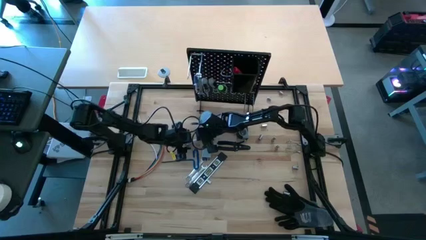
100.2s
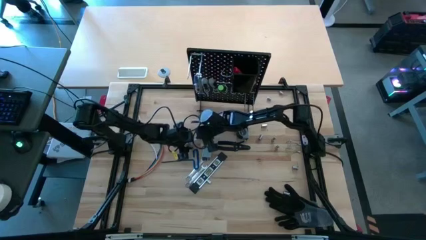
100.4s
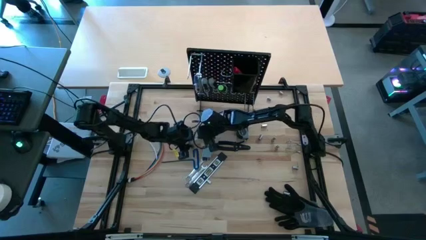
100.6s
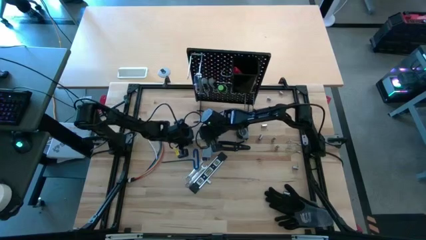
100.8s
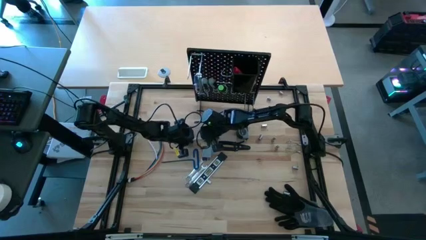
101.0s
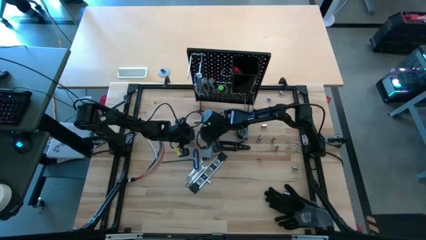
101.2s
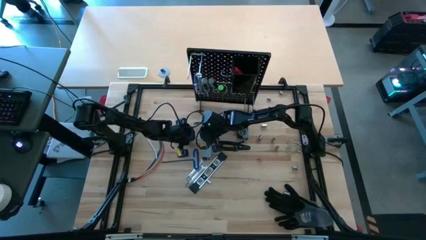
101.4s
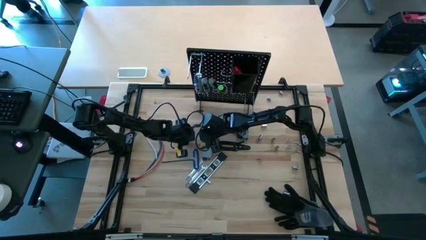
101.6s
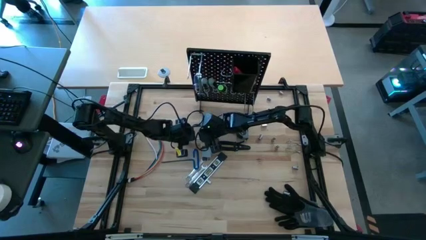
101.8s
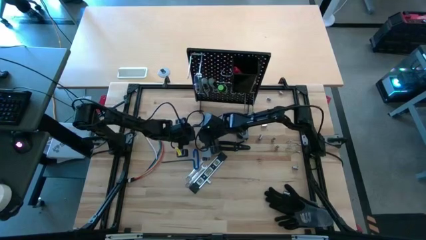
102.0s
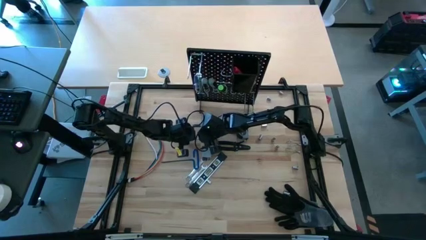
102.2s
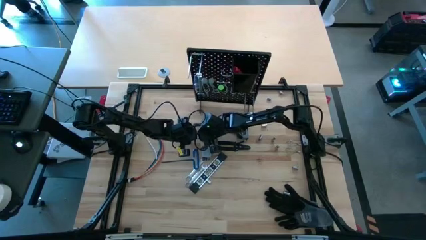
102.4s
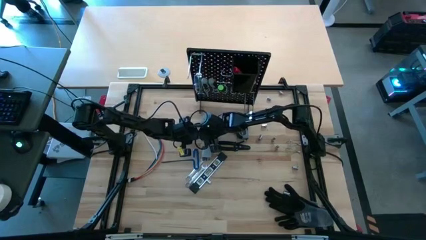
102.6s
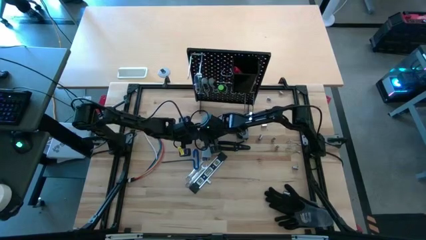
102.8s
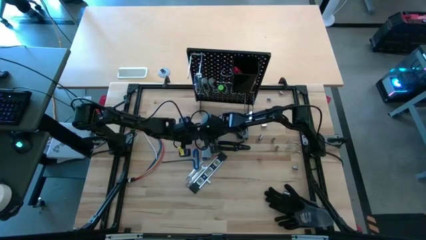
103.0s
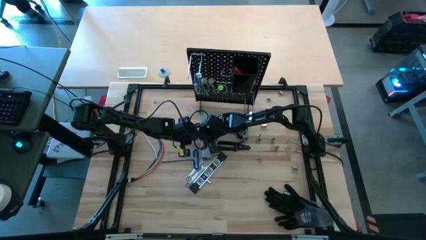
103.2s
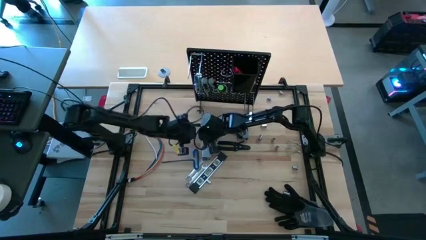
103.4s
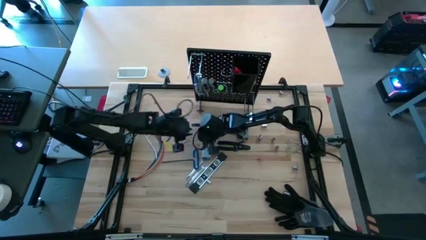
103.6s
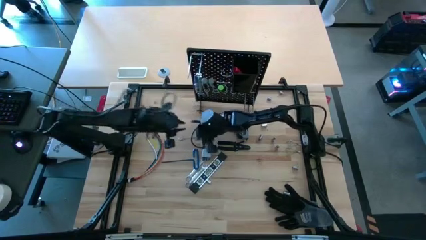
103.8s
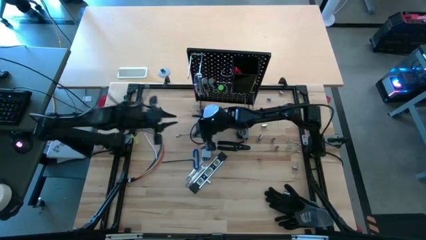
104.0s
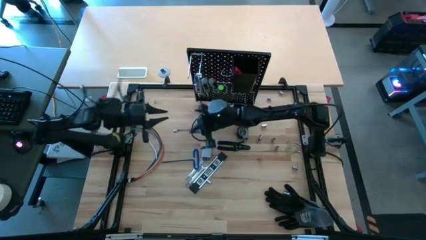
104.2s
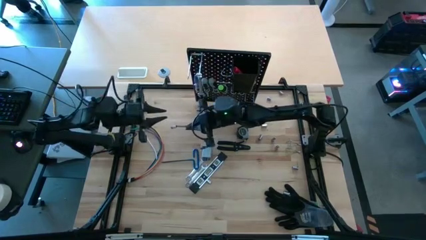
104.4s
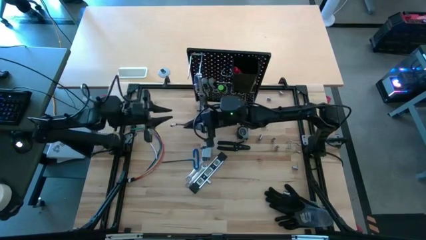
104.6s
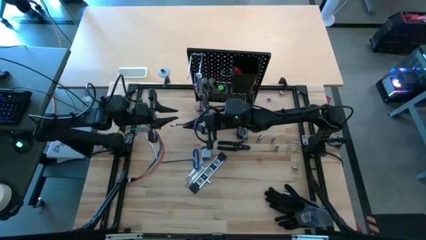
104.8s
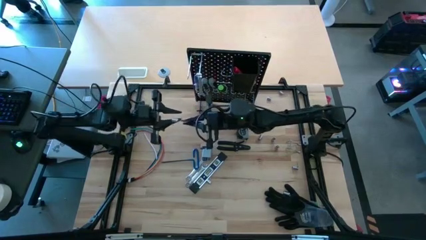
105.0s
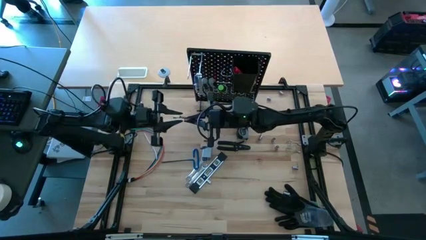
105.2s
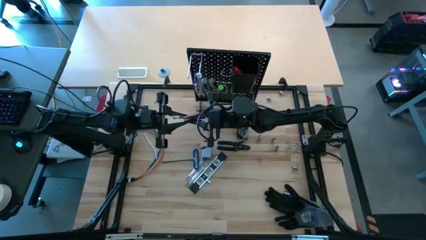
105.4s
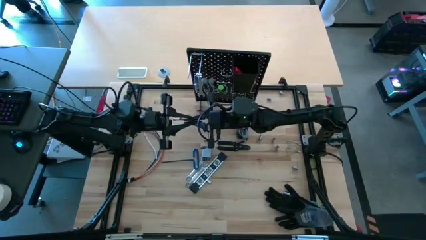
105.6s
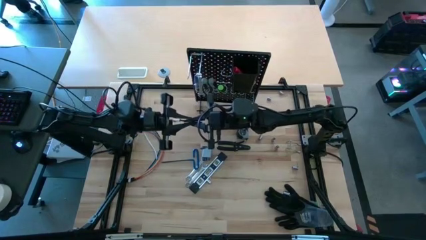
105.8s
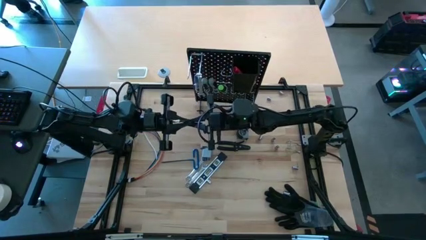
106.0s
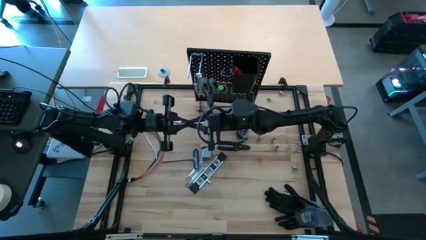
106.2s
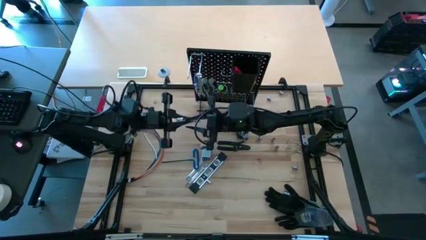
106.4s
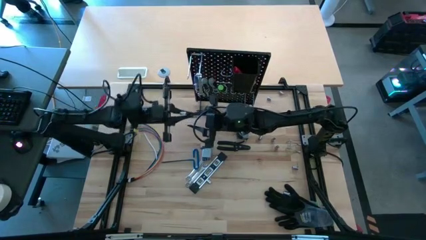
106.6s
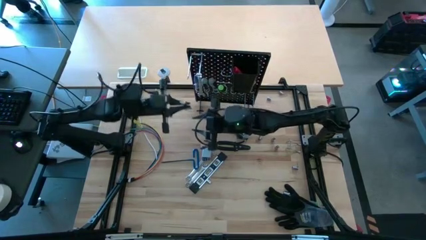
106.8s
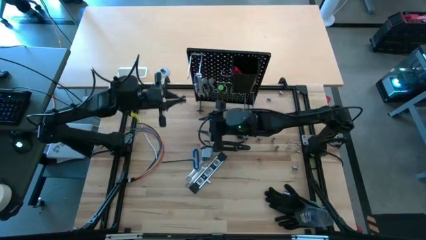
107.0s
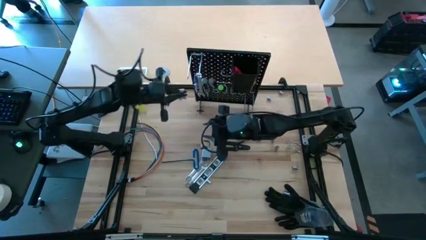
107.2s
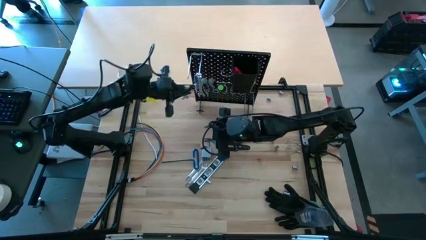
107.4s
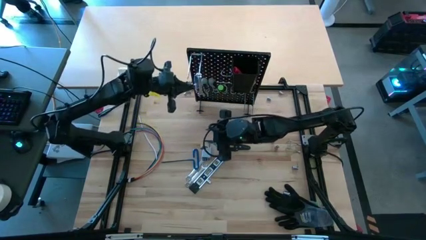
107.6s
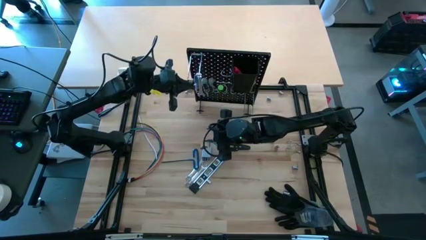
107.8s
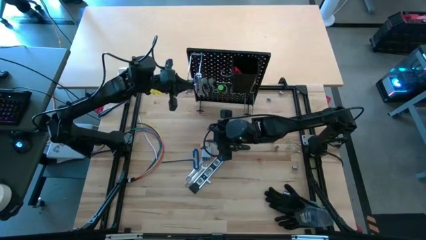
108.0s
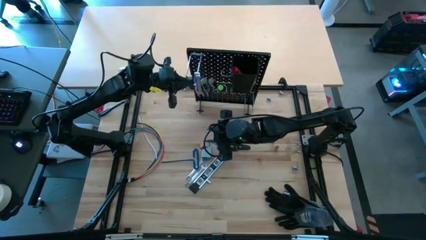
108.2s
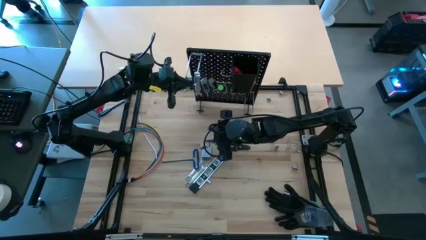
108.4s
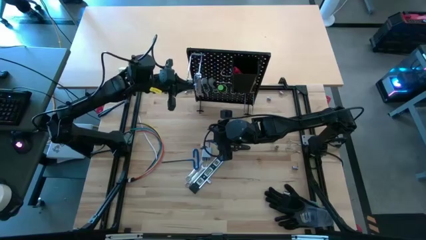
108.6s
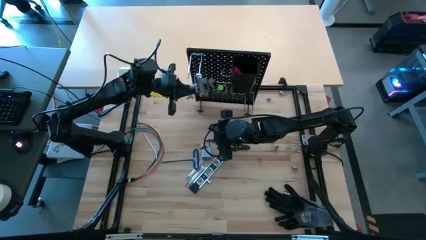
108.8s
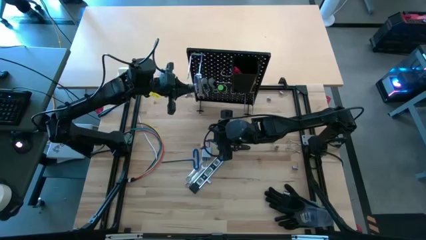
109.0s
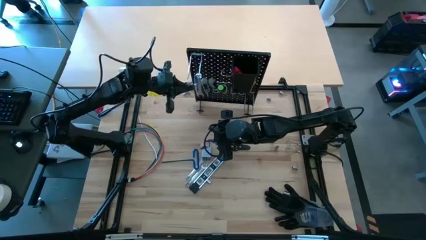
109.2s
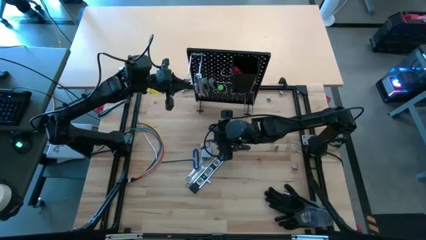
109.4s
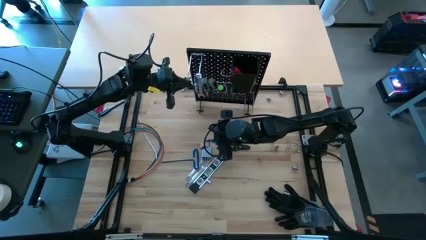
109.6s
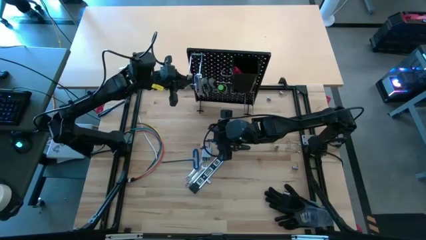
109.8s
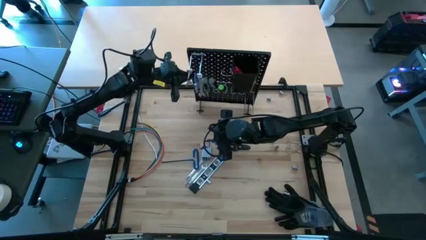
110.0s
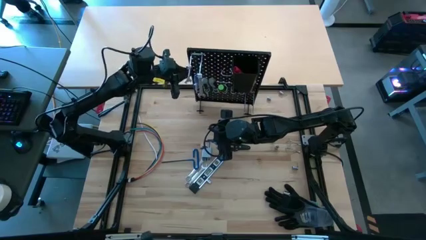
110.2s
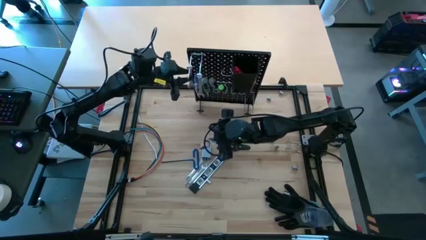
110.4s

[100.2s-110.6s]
Task: Hang tools onto peg board
Hang the wrench on the peg board

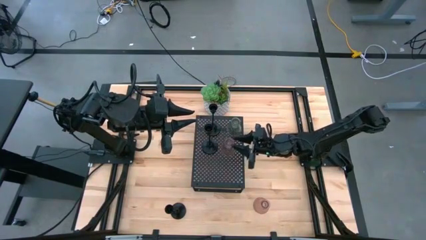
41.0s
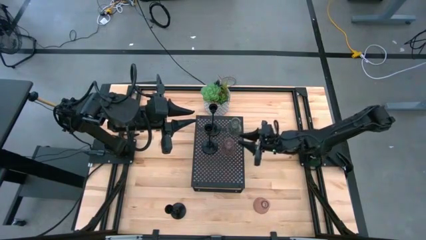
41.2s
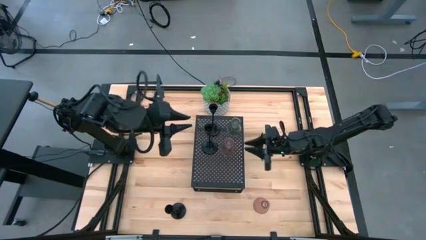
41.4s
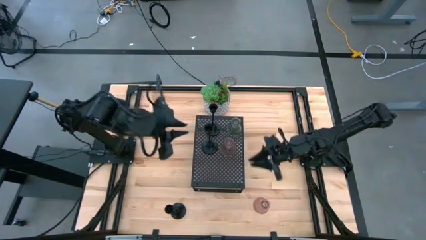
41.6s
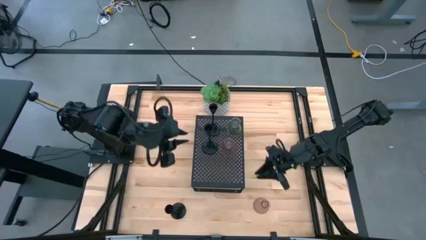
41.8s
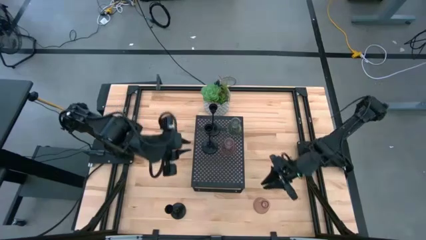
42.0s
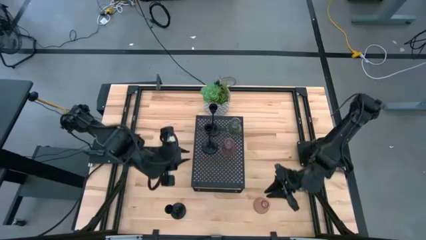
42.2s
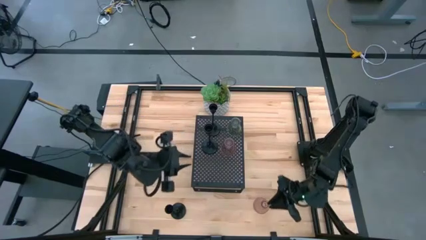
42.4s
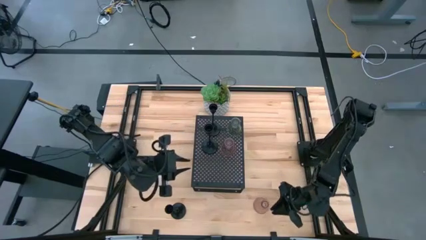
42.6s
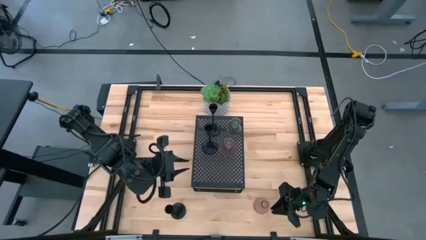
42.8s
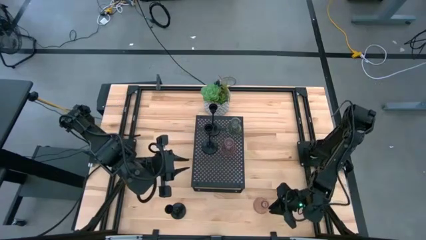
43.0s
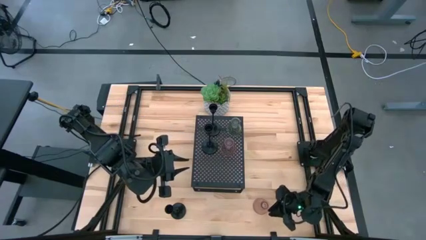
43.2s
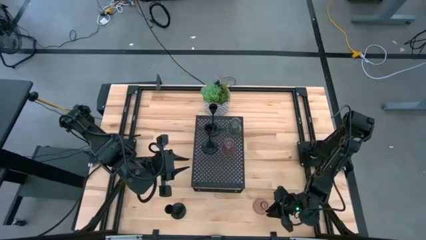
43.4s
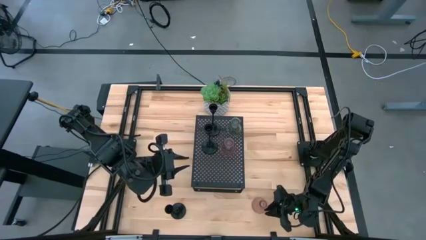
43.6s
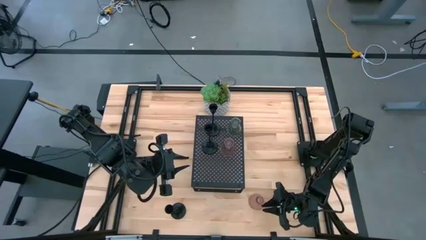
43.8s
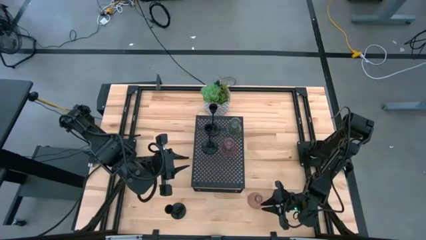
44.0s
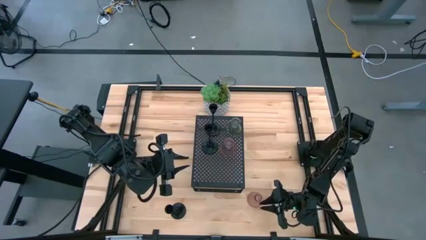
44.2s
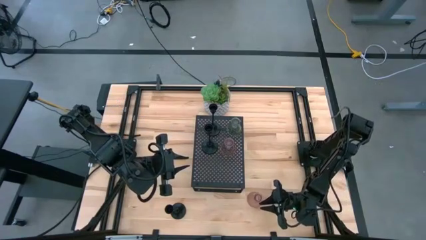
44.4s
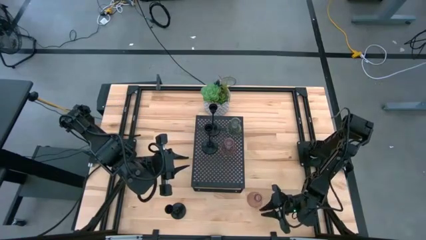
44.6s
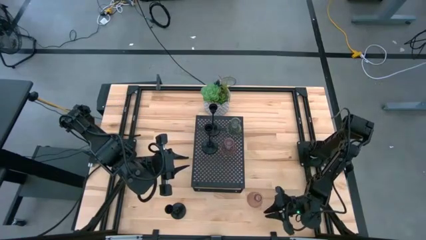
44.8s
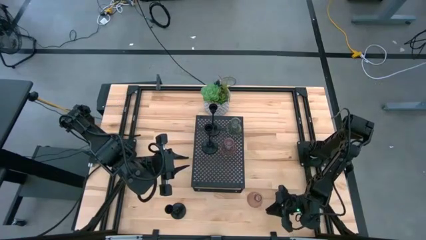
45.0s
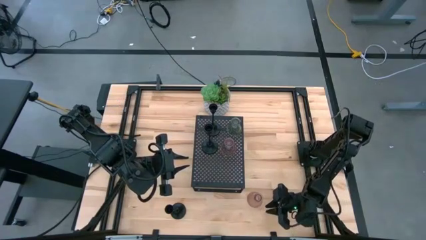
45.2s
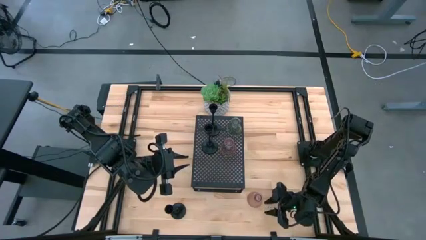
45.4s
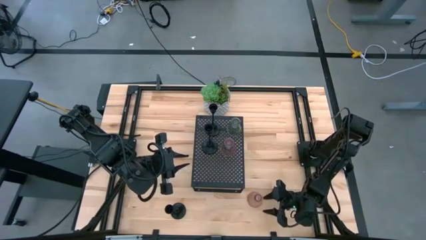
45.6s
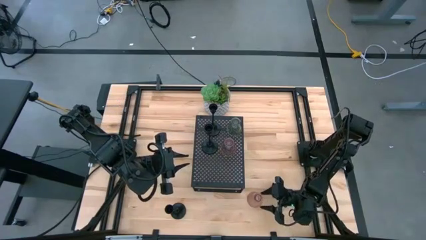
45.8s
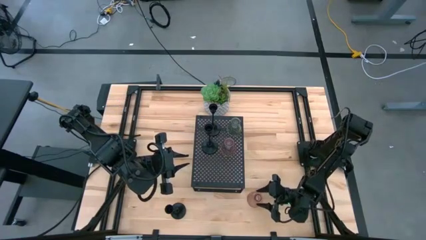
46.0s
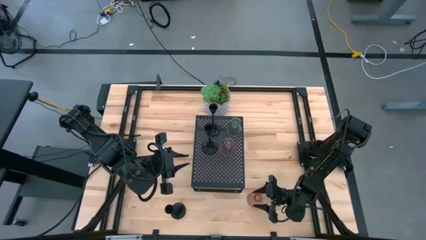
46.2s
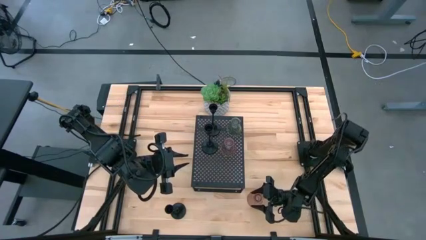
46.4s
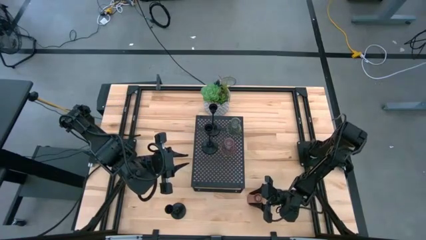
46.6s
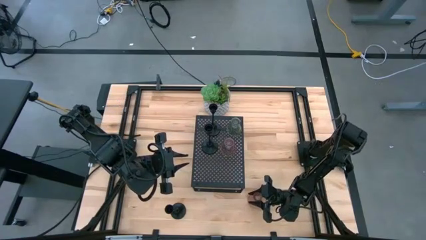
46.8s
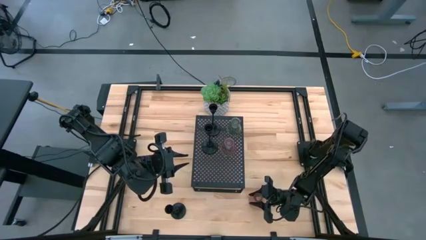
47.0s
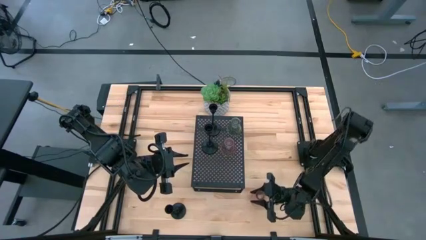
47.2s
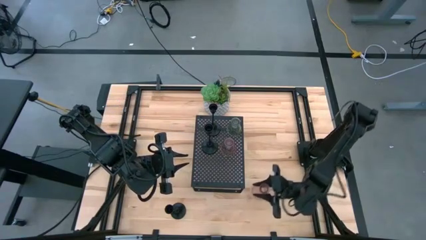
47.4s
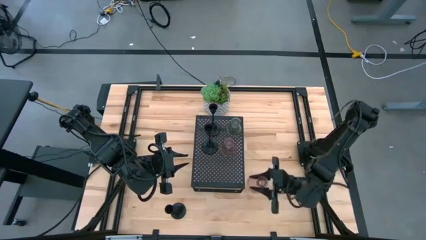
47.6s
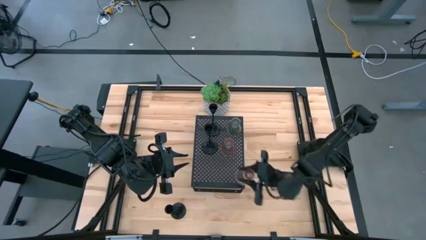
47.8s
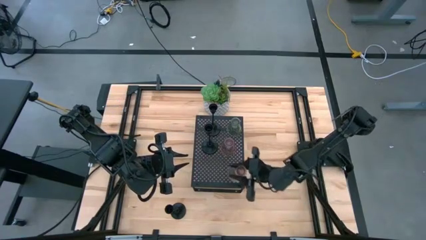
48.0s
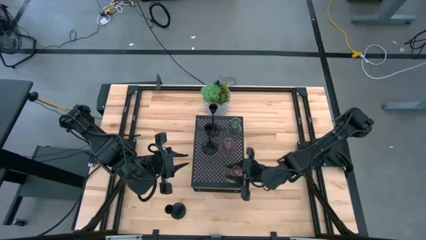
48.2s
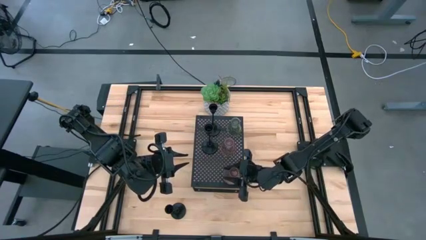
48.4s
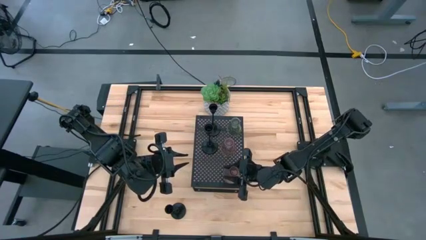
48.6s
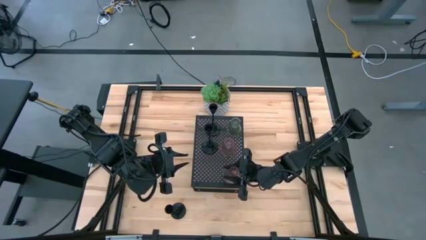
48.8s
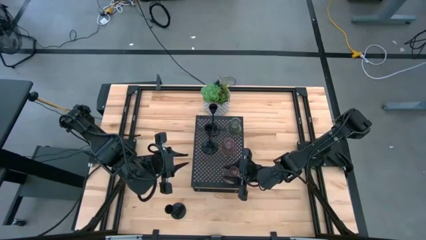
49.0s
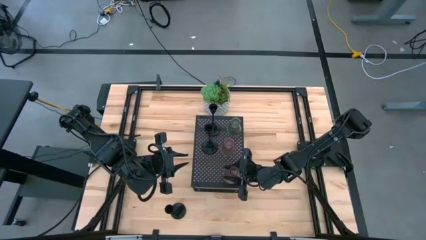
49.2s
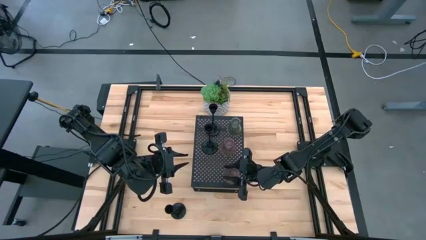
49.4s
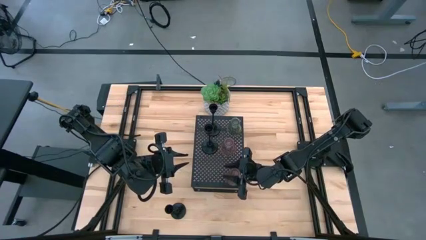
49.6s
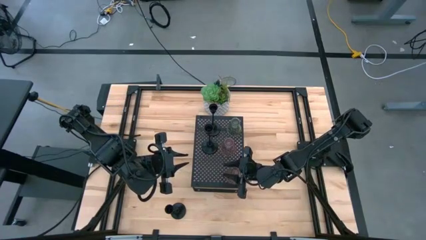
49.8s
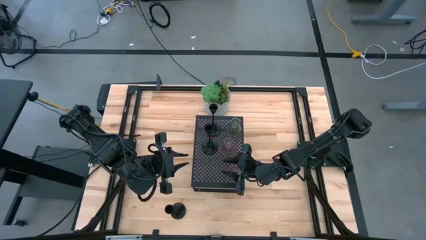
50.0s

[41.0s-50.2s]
Task: Pick & Place candle stick holders
Align the pink candle holder with the pink candle holder on the shelf
